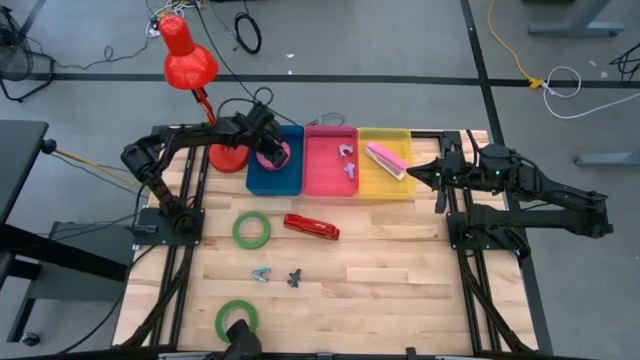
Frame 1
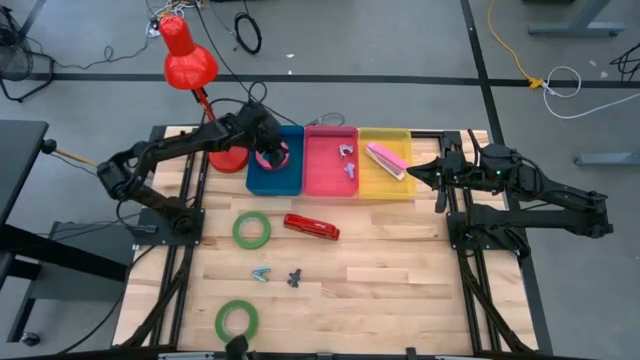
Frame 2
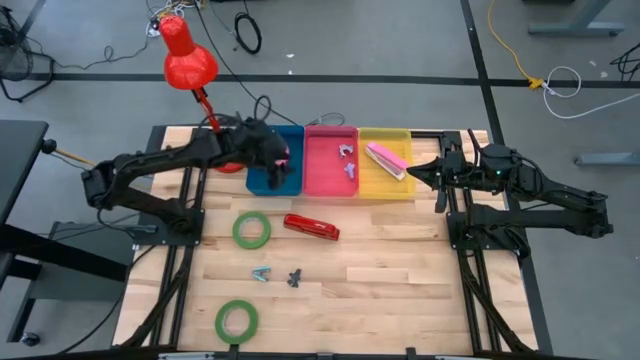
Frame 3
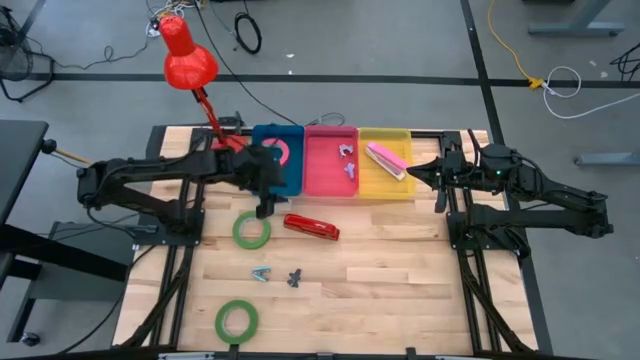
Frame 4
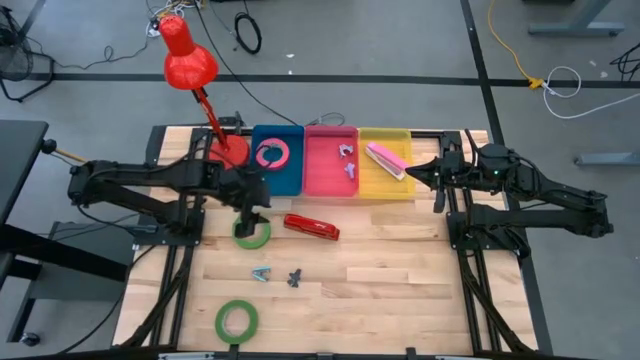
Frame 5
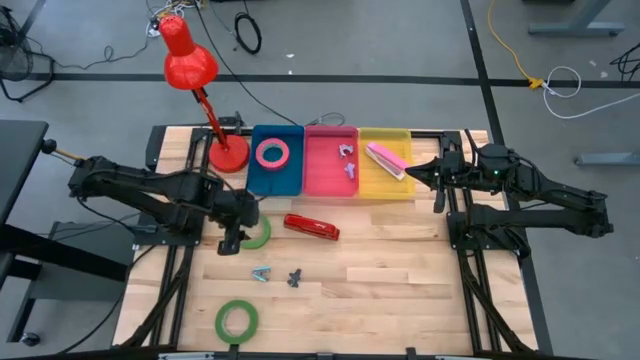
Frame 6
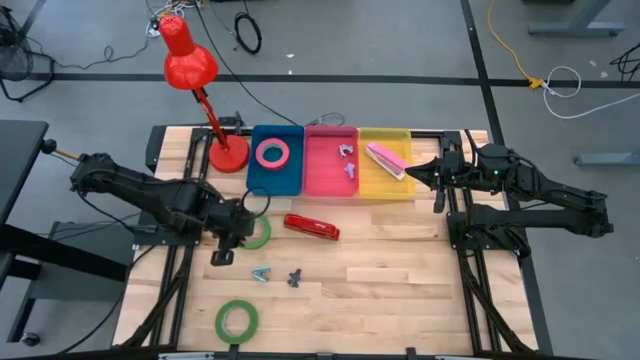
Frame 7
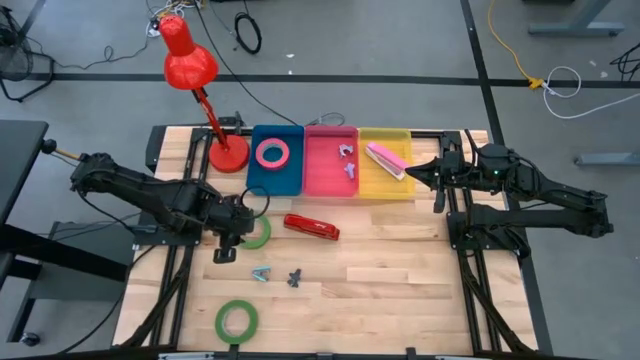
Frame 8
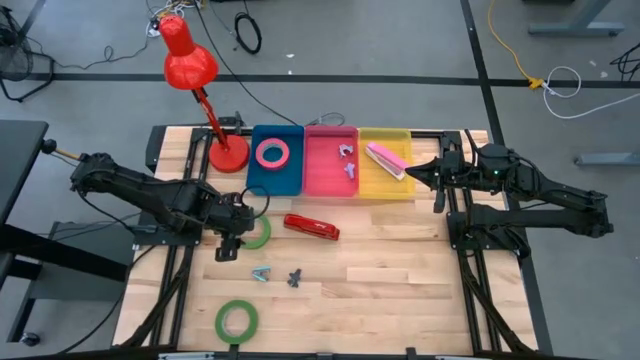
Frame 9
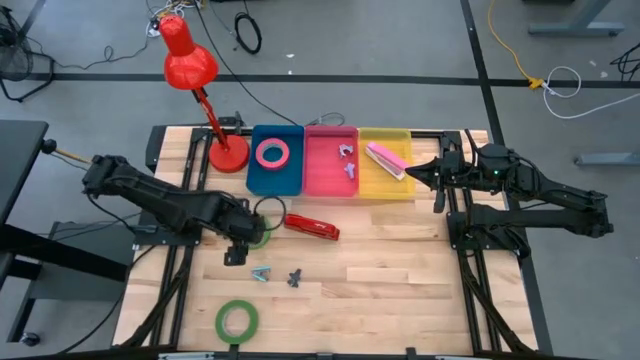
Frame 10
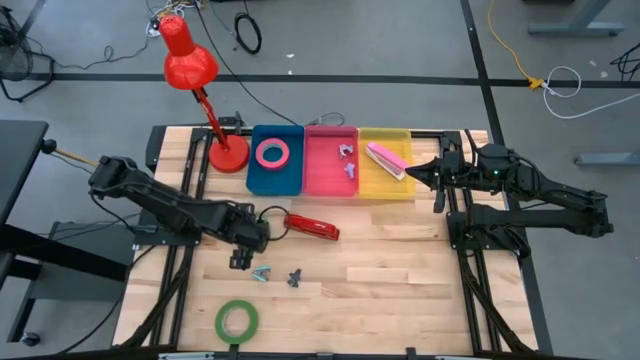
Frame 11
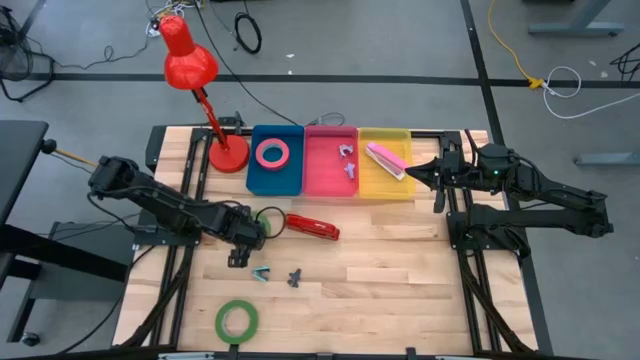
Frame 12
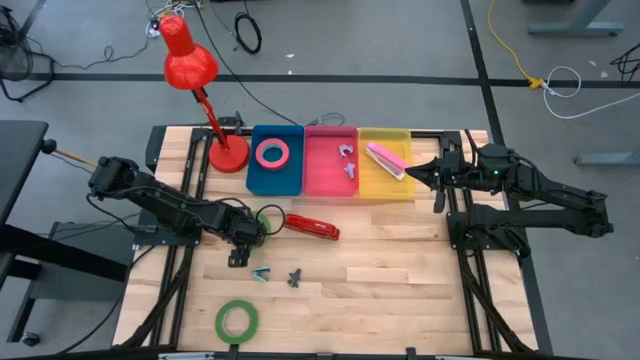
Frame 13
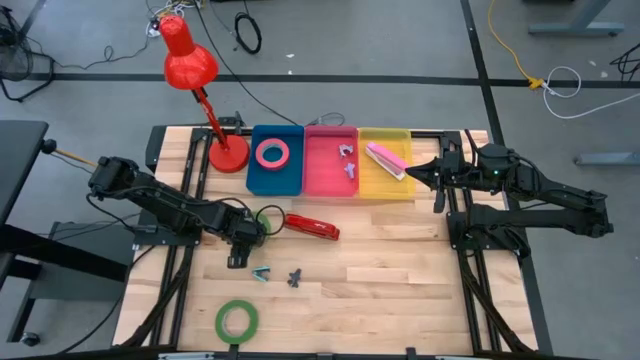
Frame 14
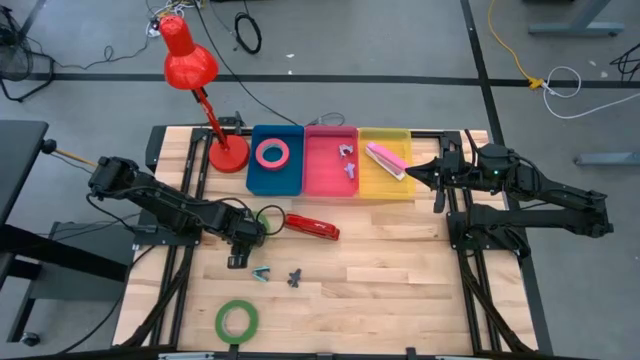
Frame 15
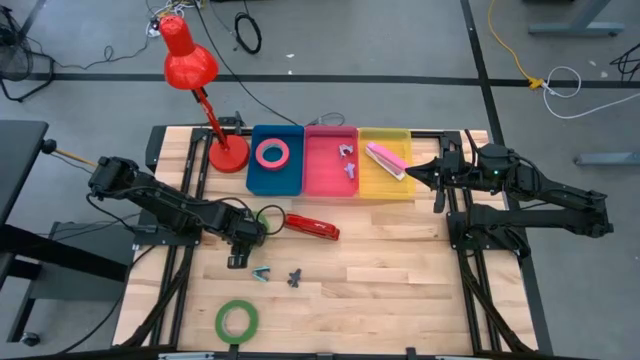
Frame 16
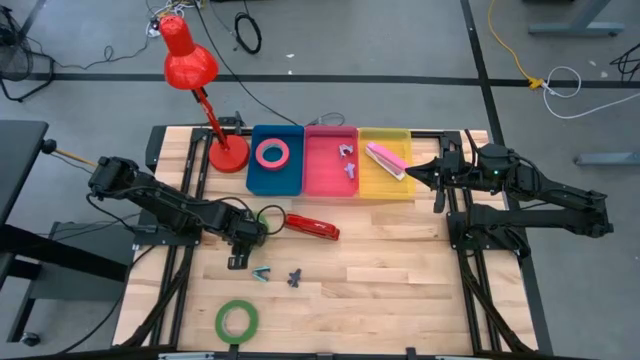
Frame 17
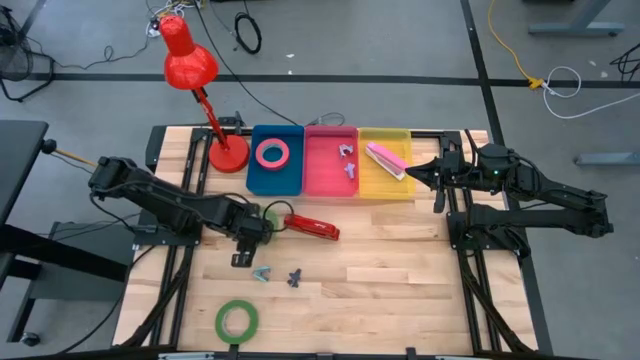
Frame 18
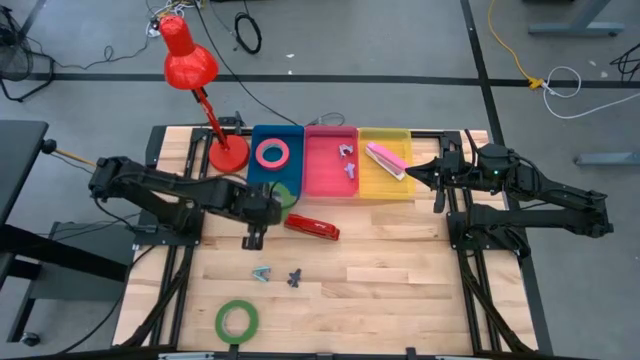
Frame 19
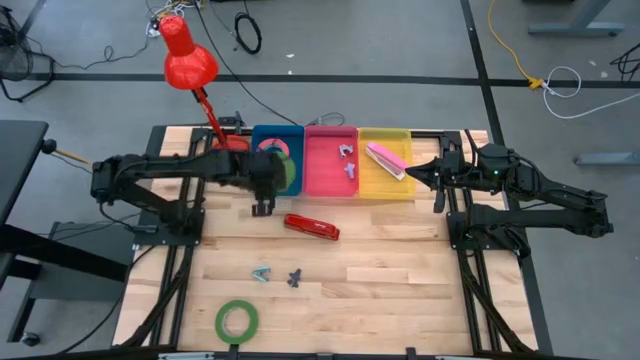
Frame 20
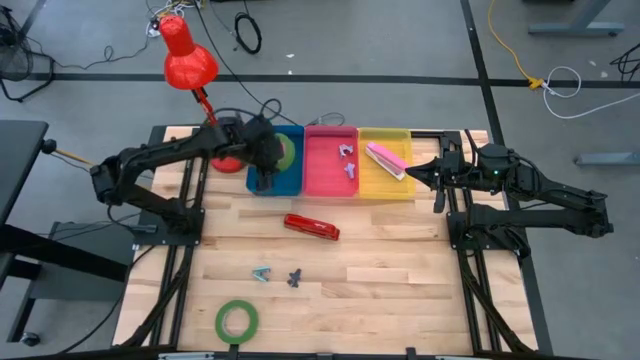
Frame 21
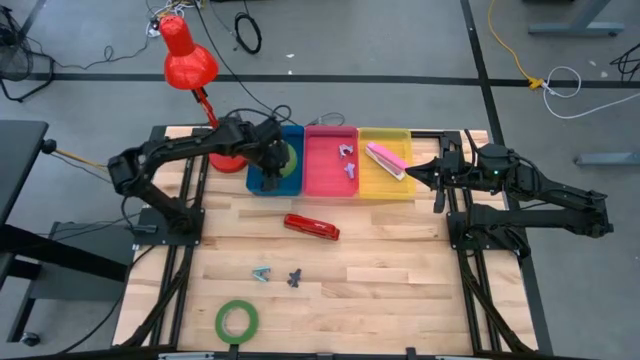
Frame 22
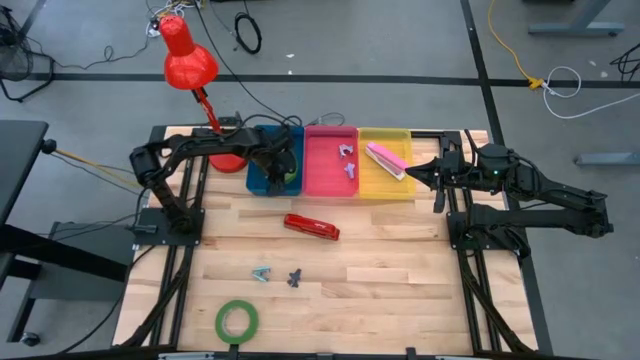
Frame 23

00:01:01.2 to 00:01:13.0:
Task: Pick and place Stapler, Stapler remover, tape
Put the green tape into the blue bin

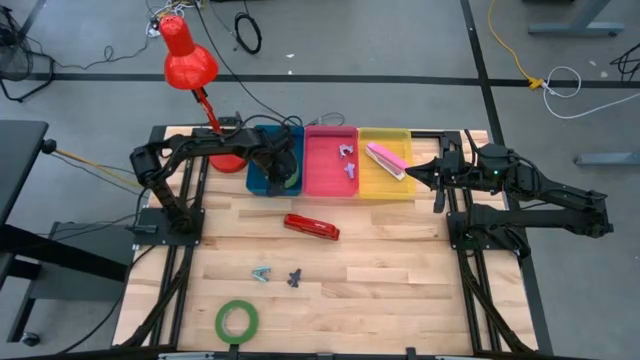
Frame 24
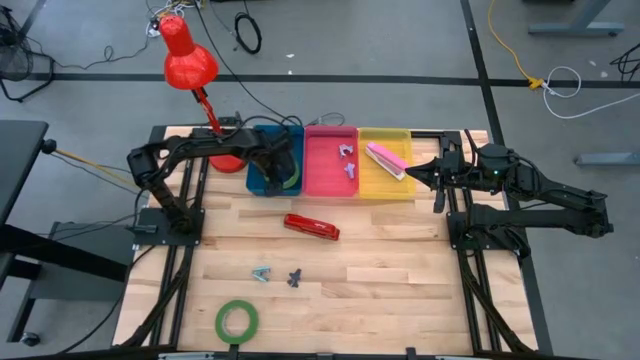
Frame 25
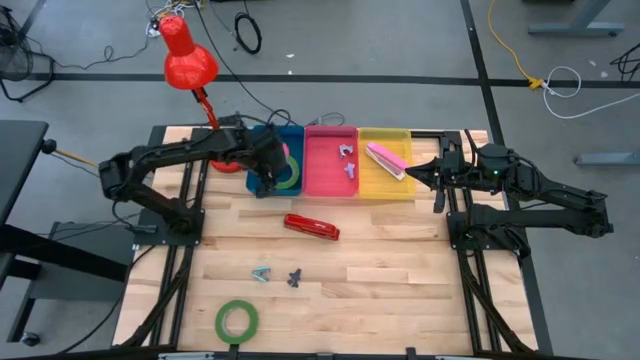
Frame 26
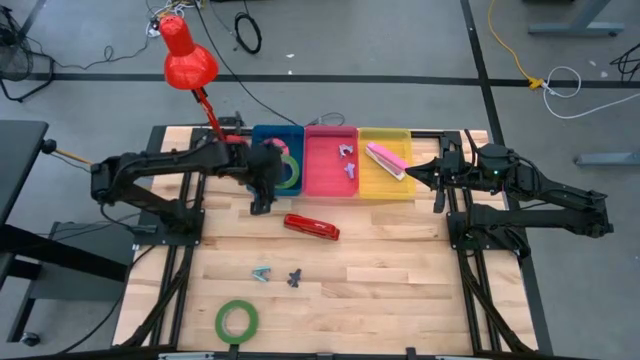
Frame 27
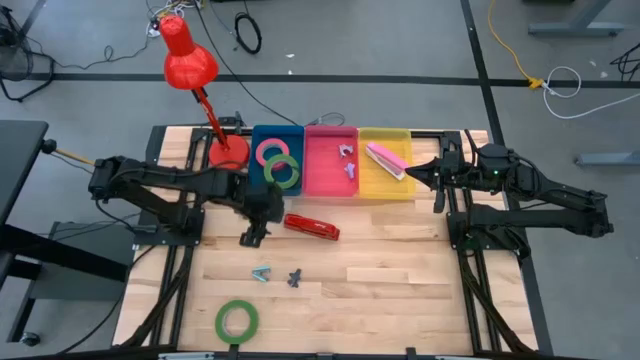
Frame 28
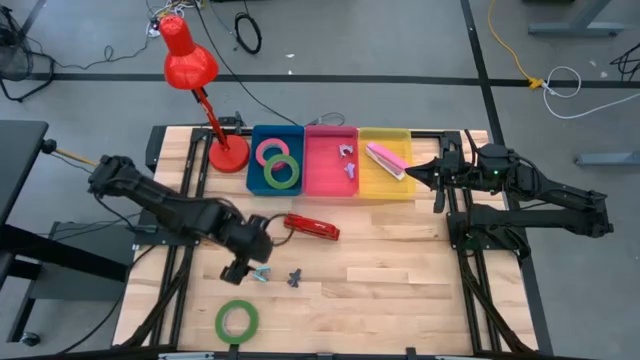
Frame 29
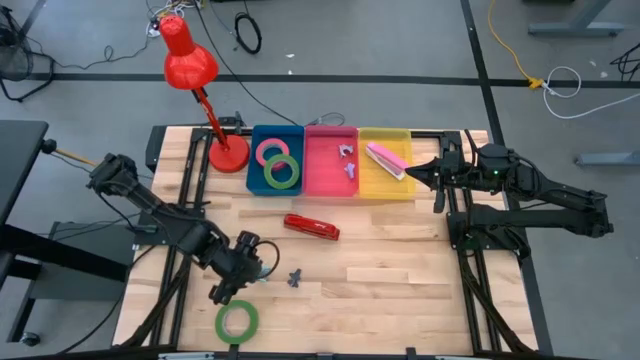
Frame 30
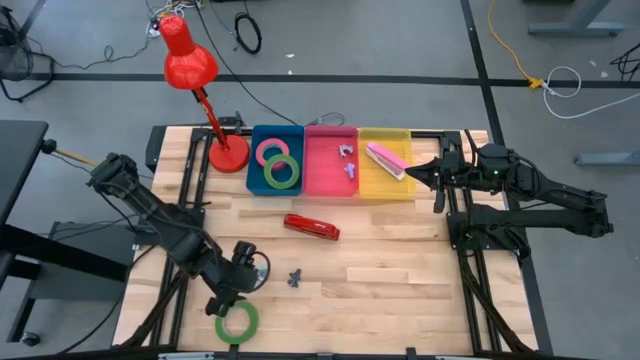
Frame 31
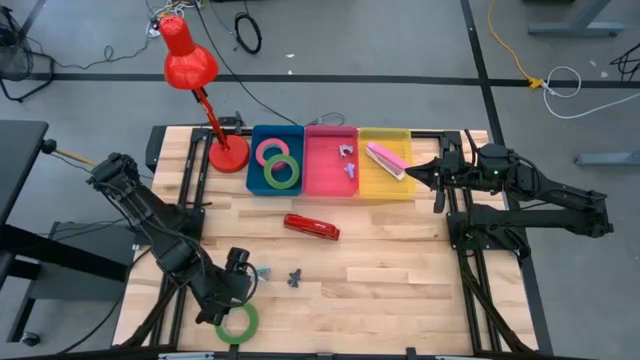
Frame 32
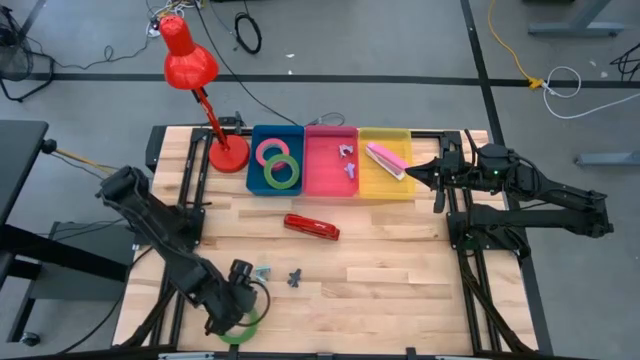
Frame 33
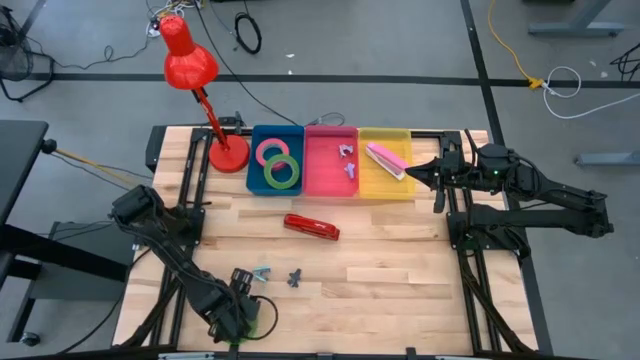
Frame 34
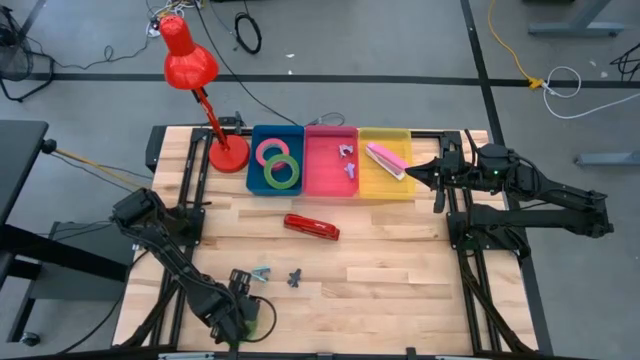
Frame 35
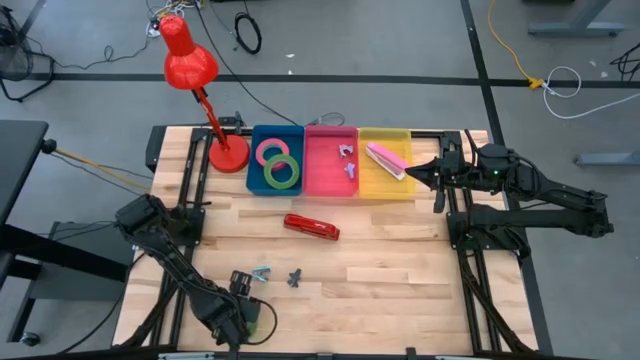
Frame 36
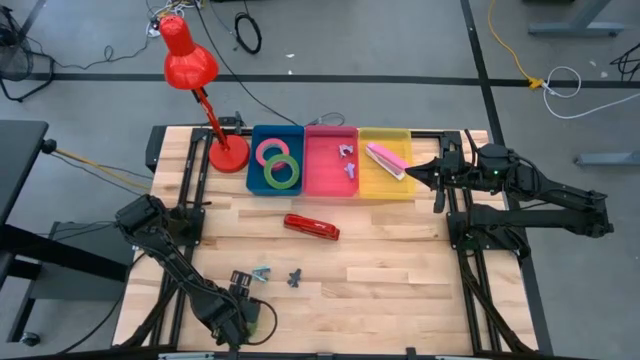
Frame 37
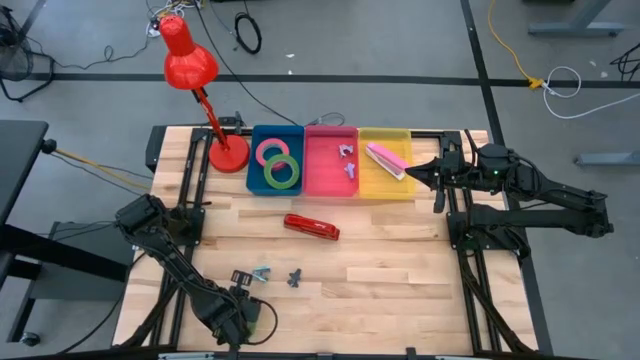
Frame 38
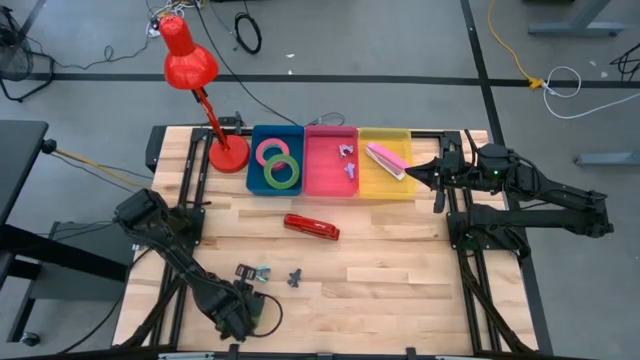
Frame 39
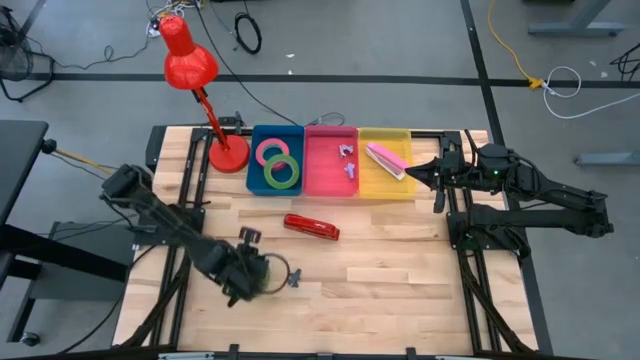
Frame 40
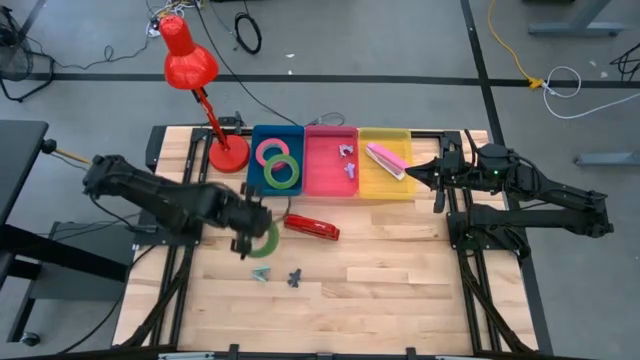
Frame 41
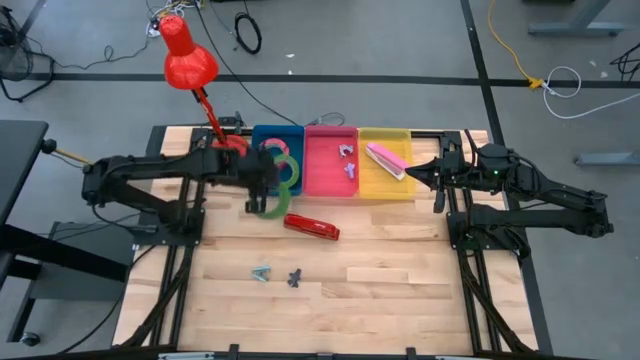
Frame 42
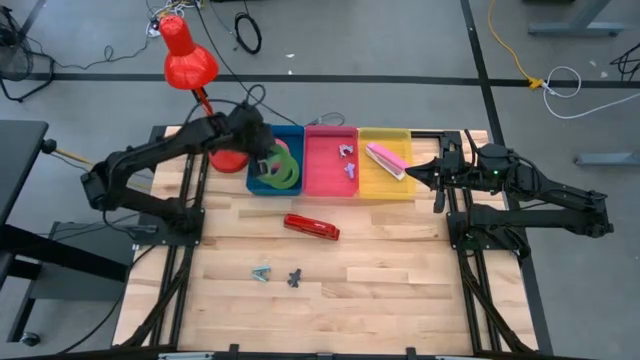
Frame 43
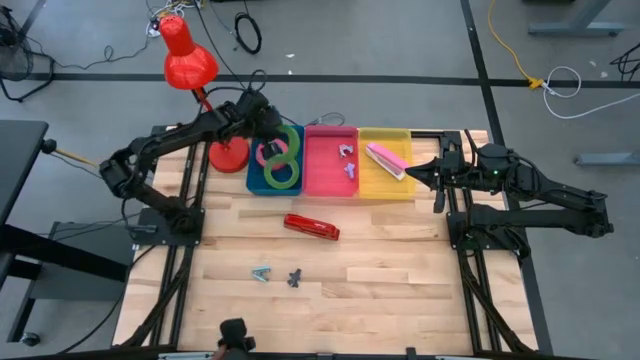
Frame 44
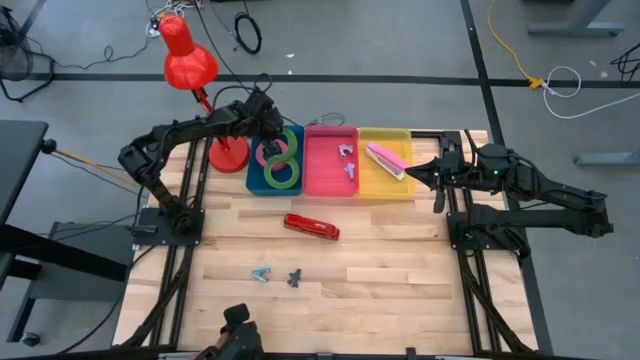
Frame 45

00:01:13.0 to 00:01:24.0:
Put the green tape into the blue bin
